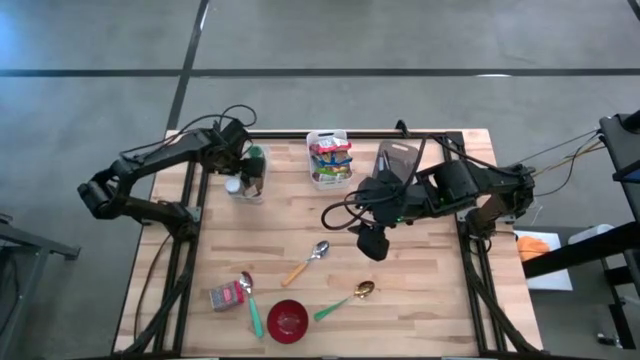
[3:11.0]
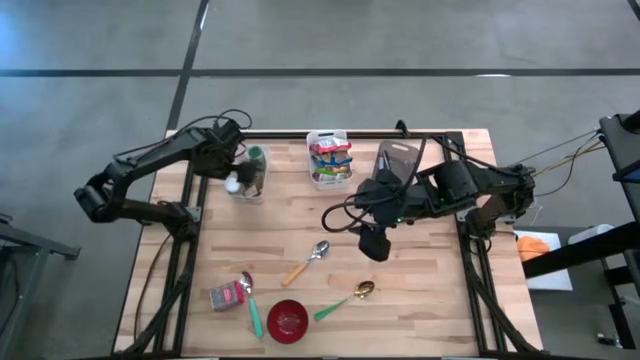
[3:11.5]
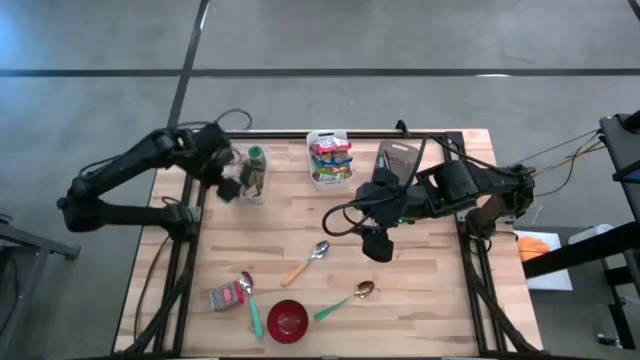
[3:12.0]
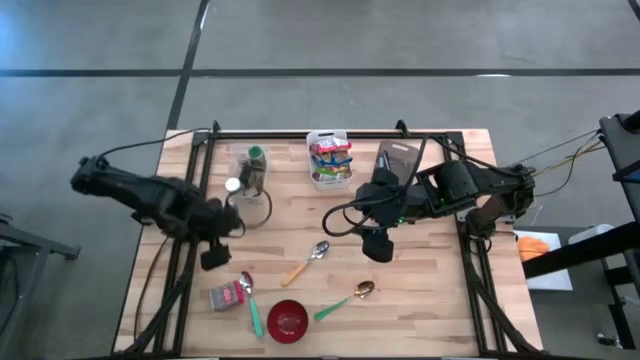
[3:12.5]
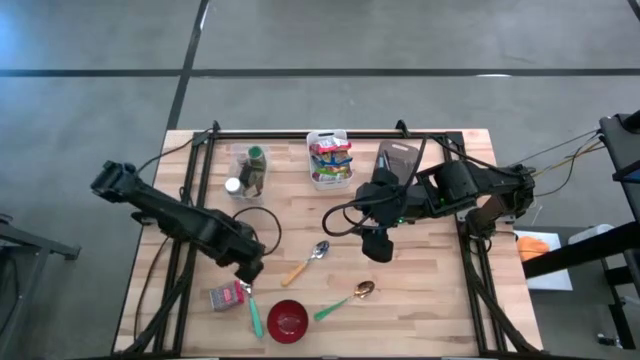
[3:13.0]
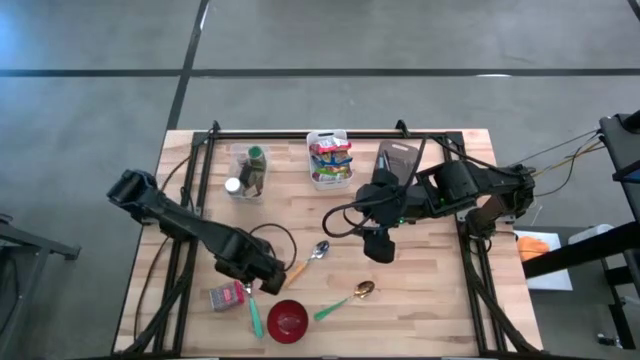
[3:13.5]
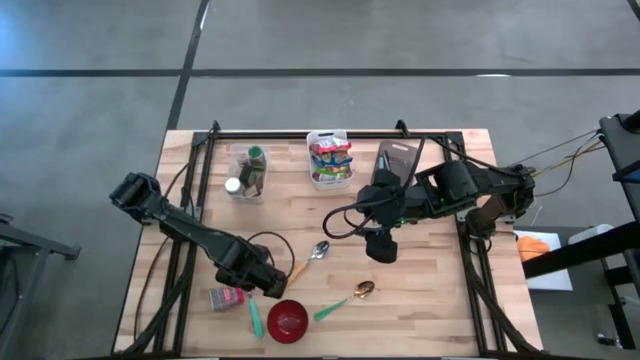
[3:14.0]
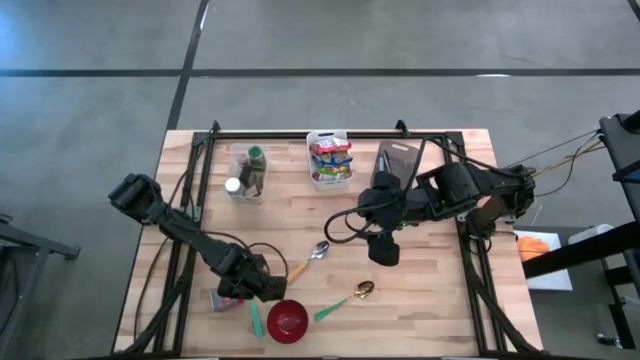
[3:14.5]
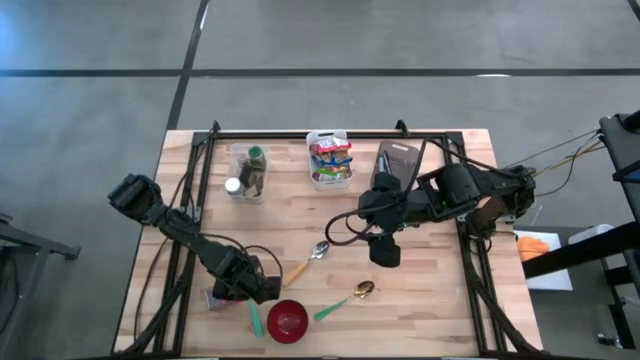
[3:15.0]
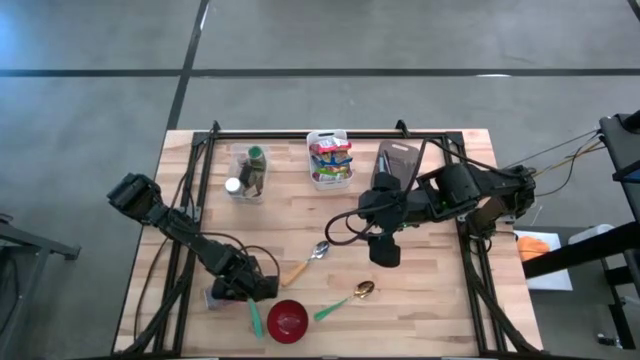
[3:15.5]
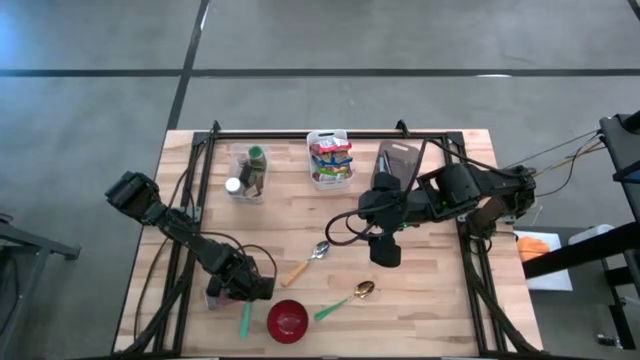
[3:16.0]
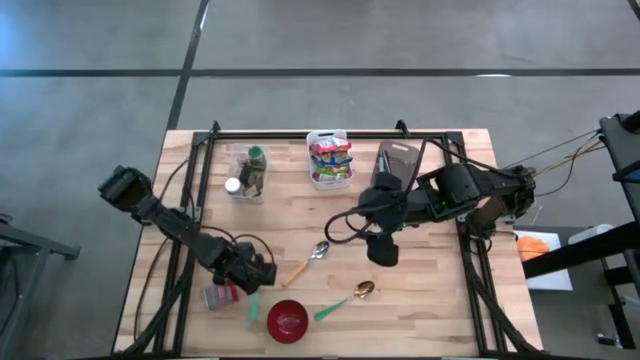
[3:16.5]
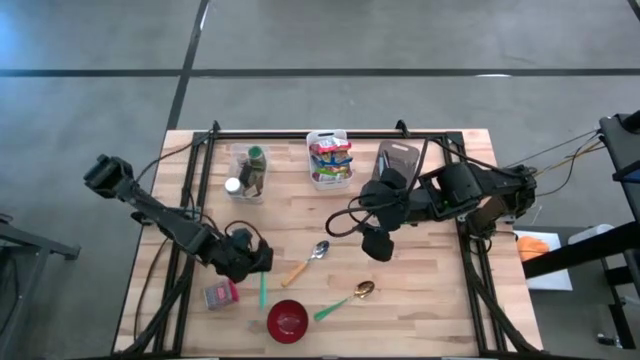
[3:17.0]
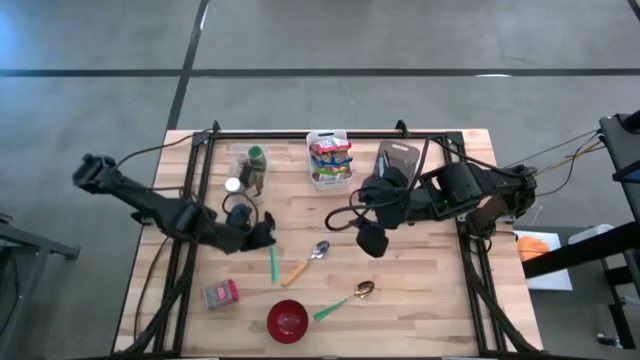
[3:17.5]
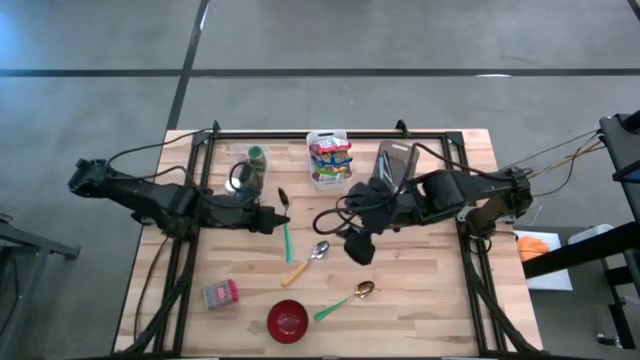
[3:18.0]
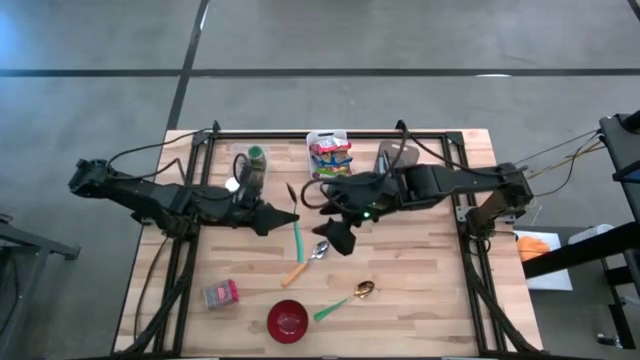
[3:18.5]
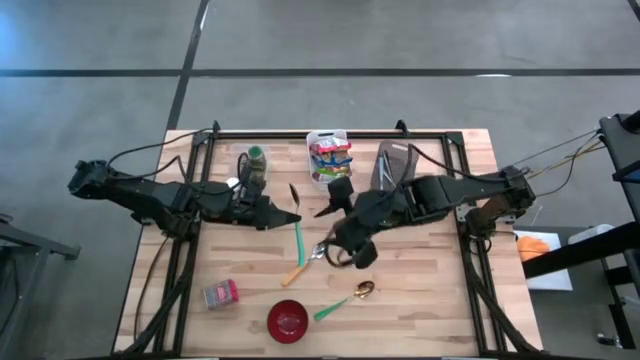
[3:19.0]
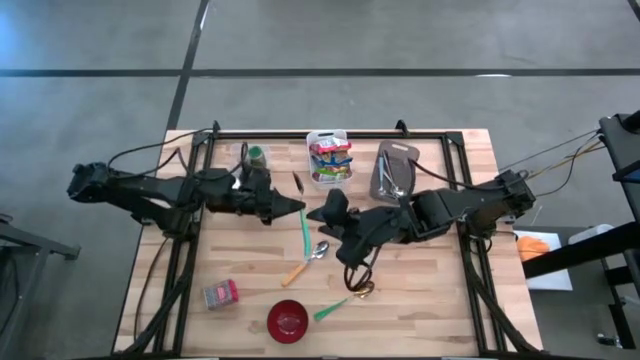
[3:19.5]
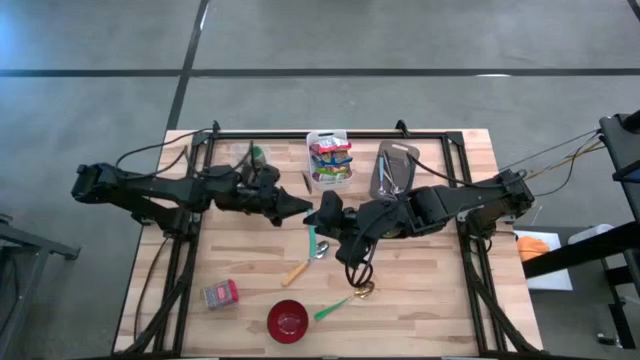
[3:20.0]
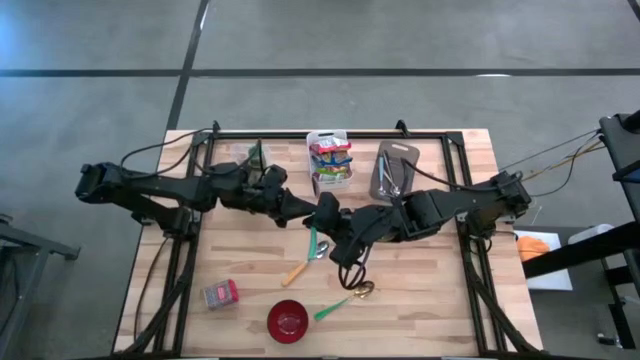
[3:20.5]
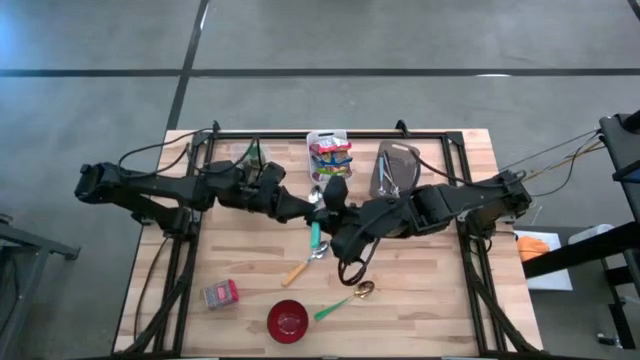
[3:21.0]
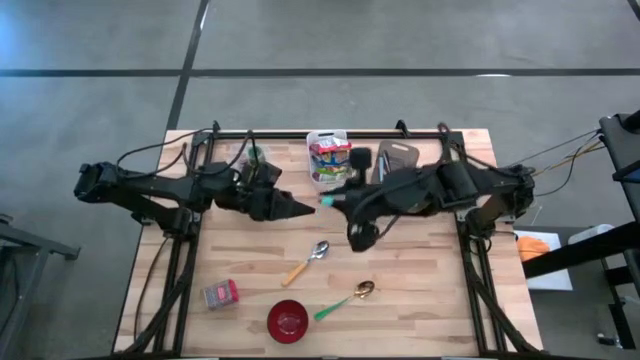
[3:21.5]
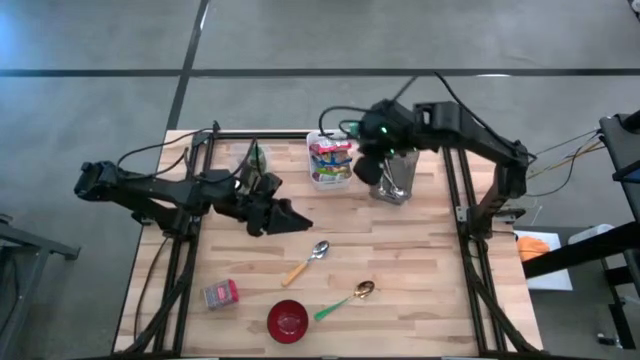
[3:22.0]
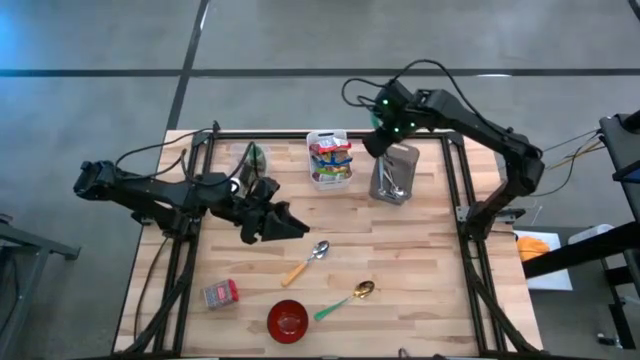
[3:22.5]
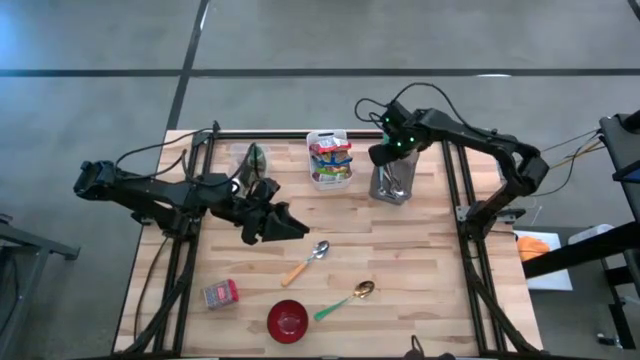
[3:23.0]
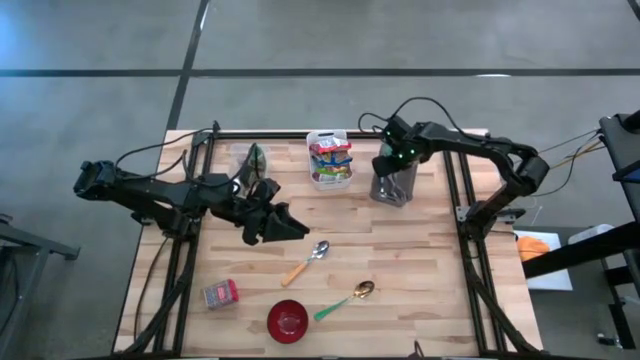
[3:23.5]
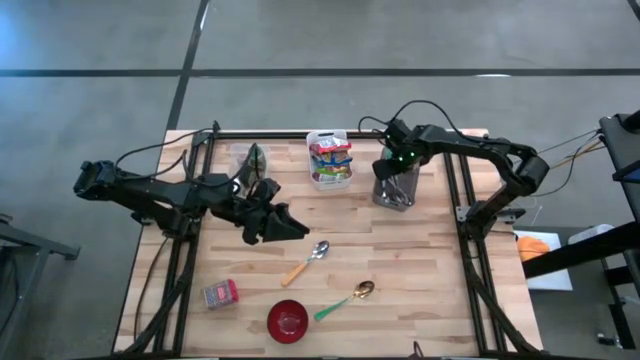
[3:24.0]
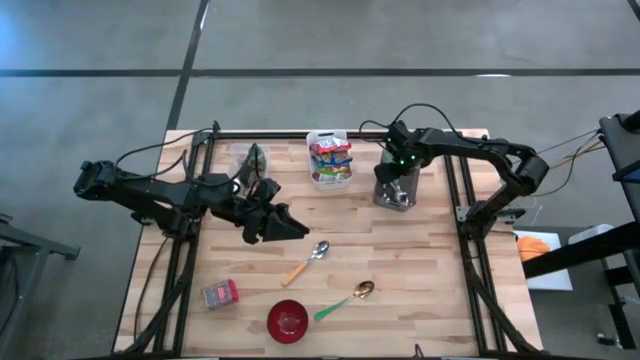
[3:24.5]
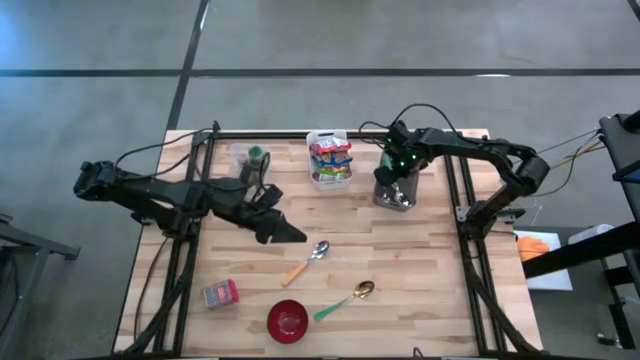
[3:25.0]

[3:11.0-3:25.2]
Put the light green spoon into the black bin

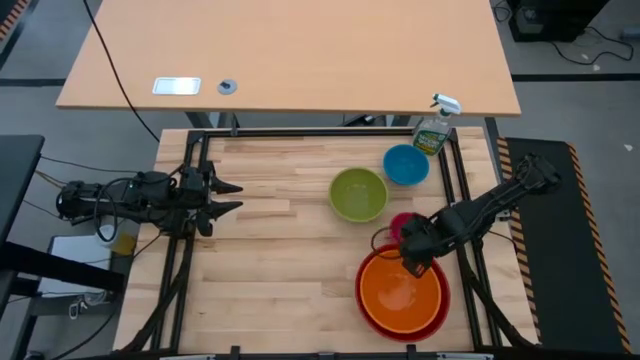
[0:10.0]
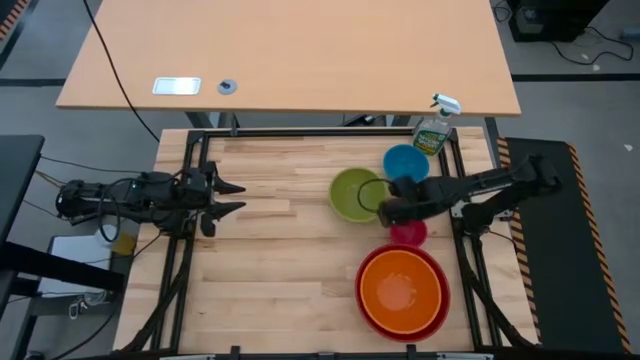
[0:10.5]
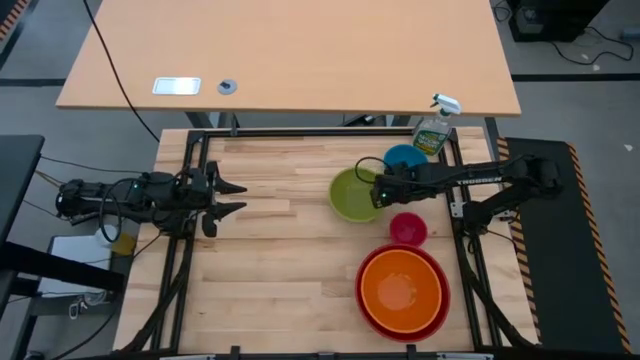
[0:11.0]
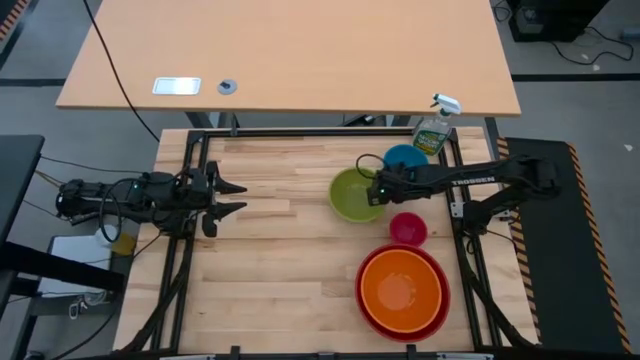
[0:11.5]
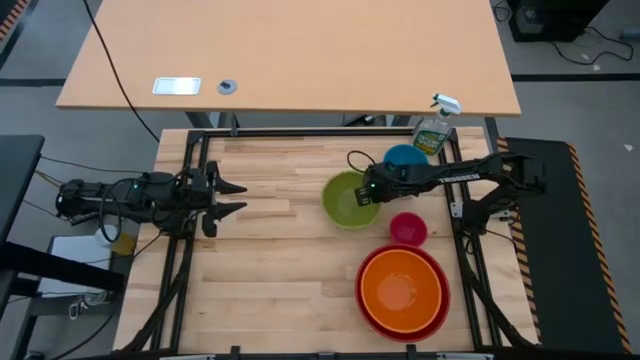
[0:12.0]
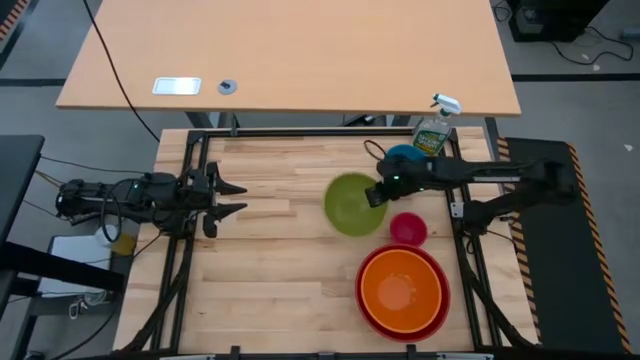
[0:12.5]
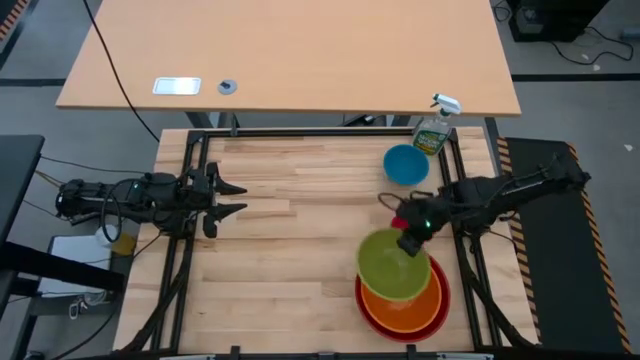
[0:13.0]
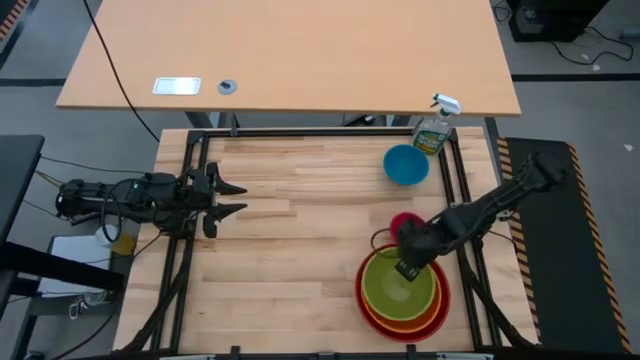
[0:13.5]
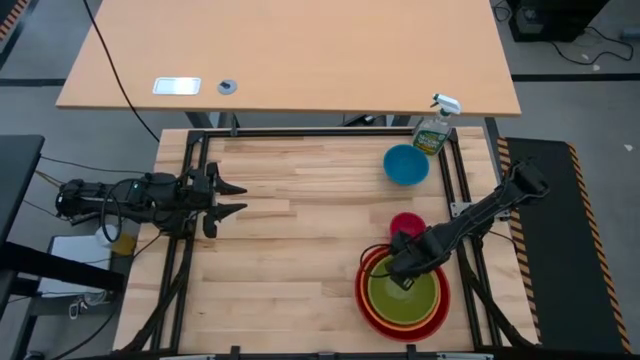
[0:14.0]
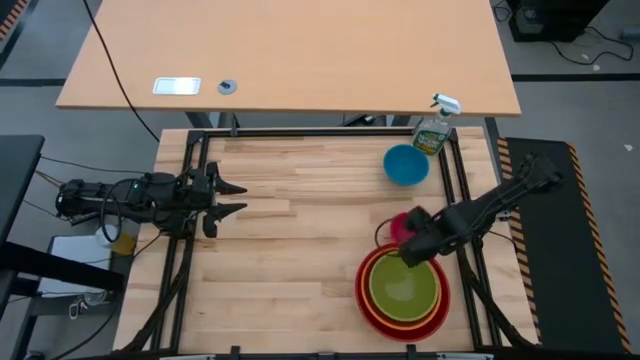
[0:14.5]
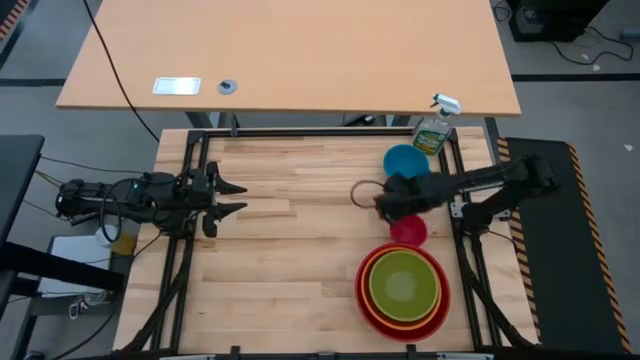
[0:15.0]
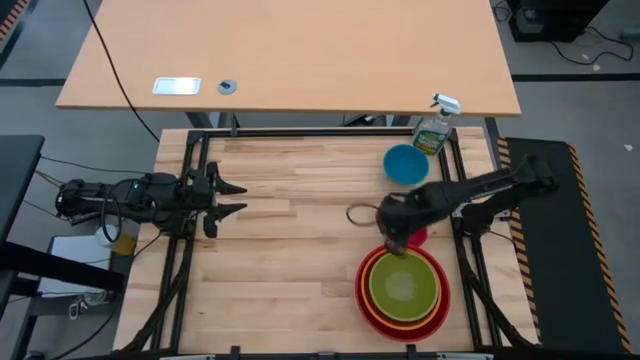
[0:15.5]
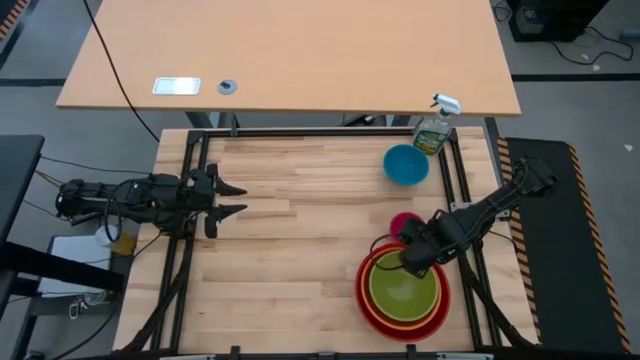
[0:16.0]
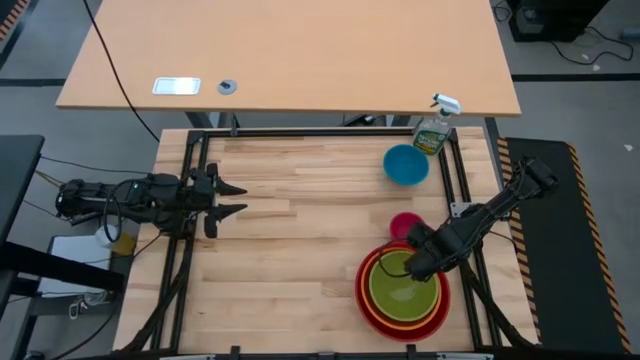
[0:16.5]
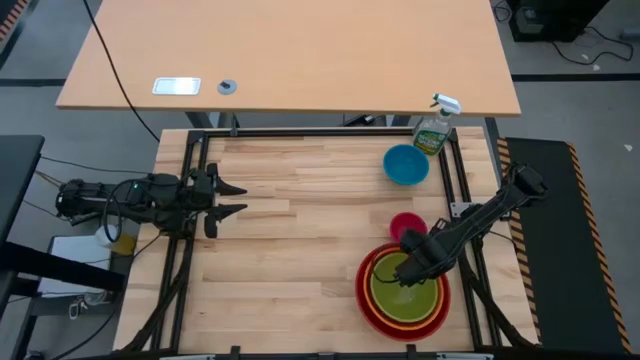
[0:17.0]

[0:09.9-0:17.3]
Stack the green bowl on the orange bowl
